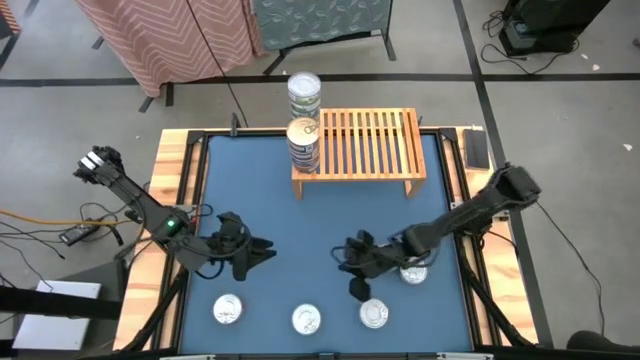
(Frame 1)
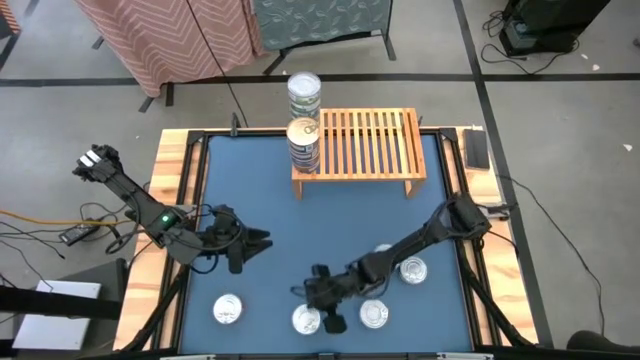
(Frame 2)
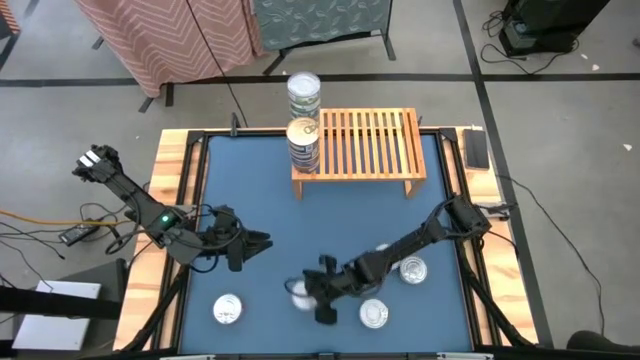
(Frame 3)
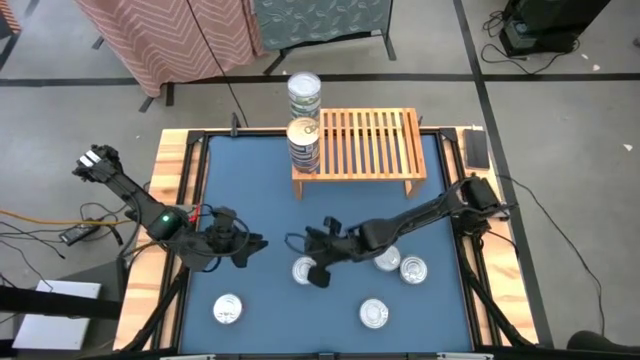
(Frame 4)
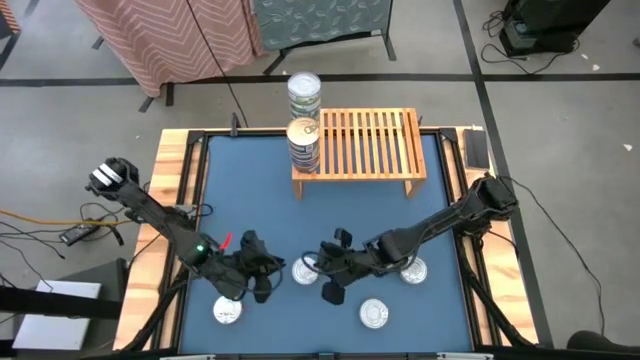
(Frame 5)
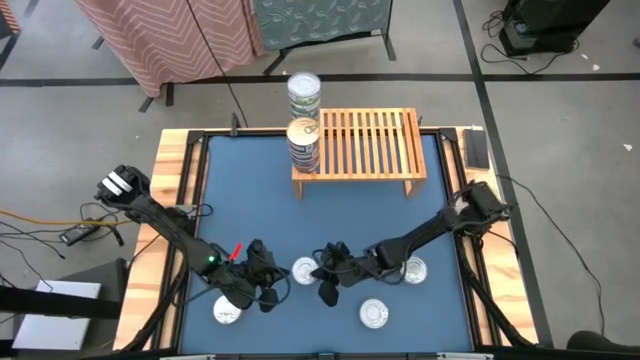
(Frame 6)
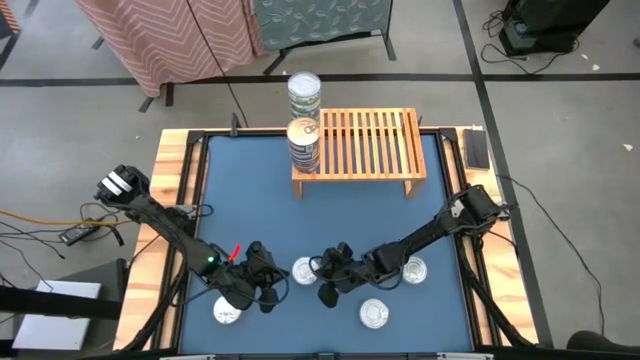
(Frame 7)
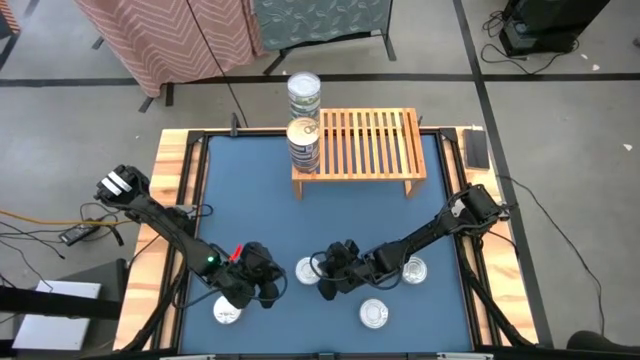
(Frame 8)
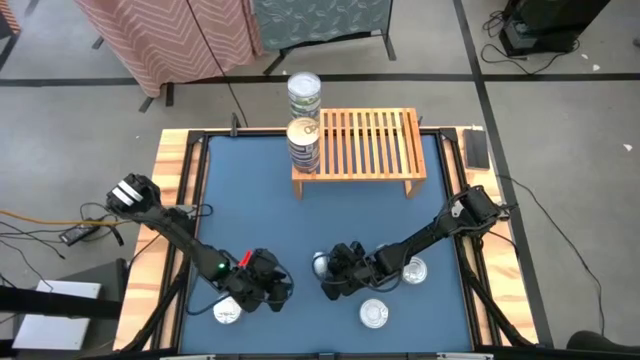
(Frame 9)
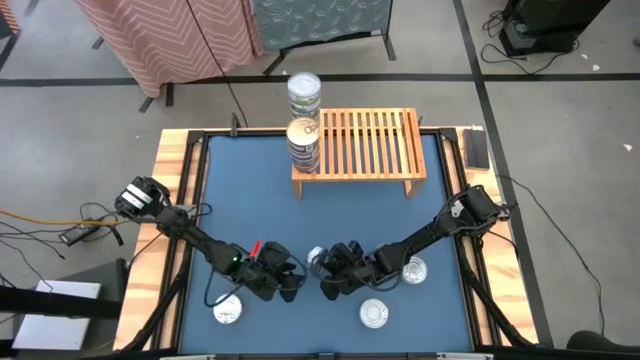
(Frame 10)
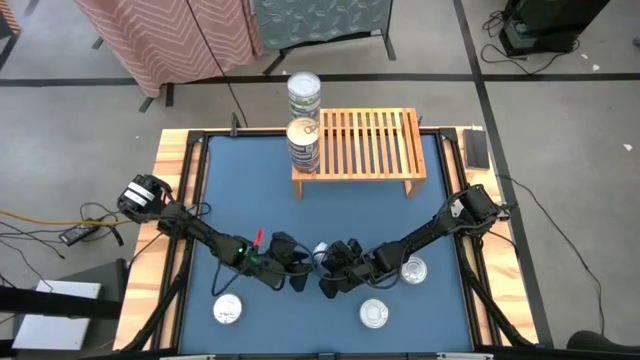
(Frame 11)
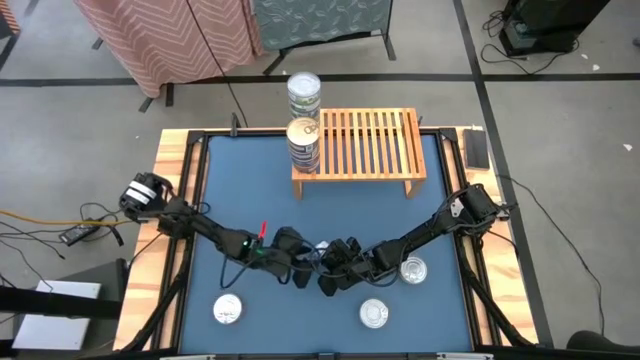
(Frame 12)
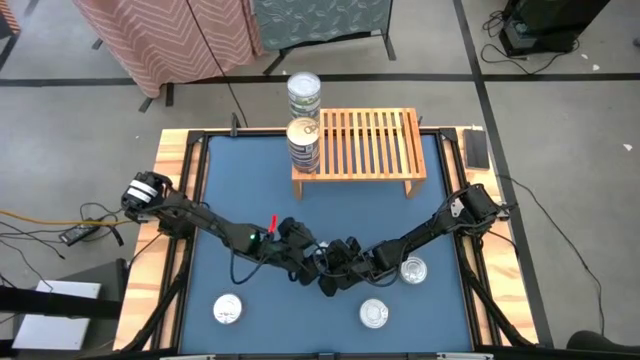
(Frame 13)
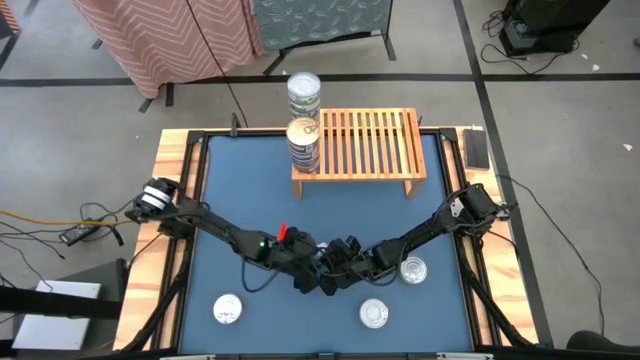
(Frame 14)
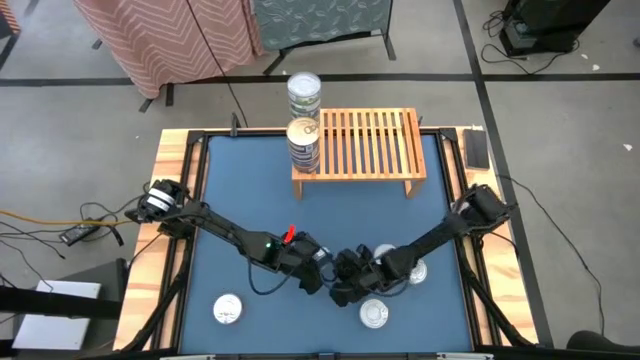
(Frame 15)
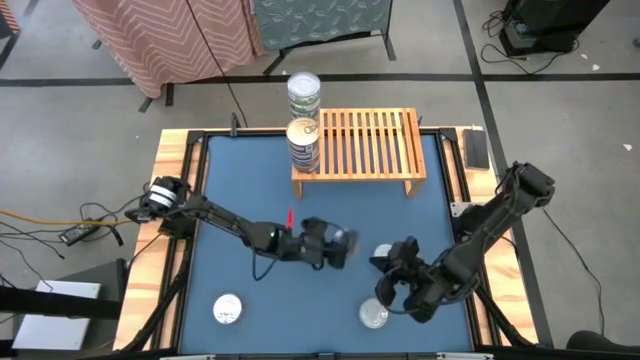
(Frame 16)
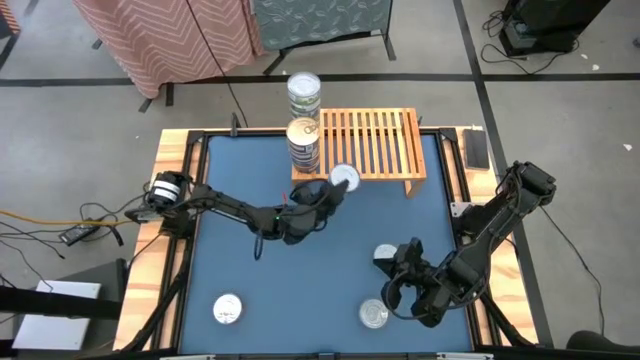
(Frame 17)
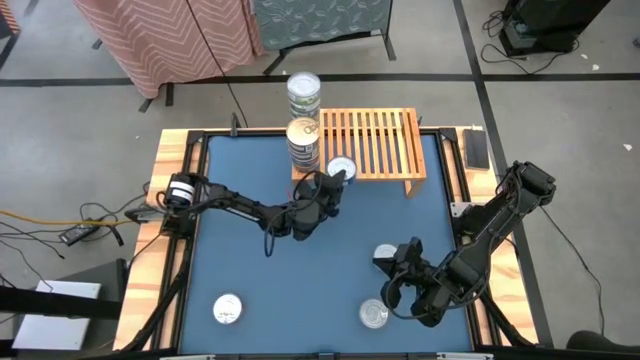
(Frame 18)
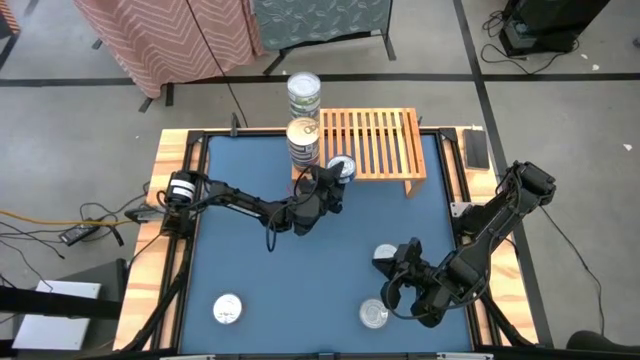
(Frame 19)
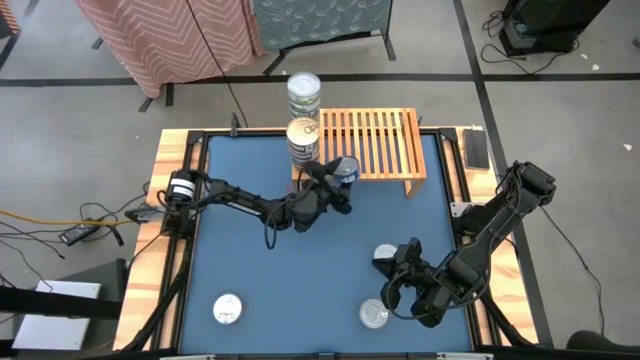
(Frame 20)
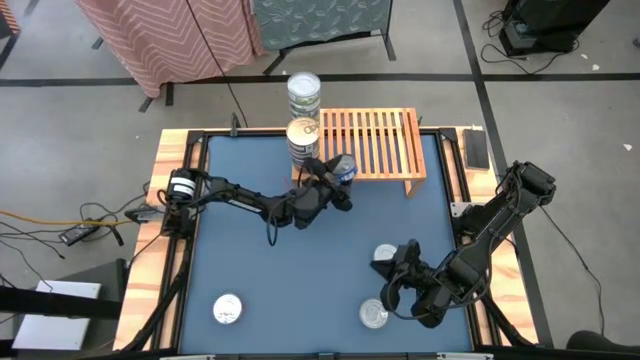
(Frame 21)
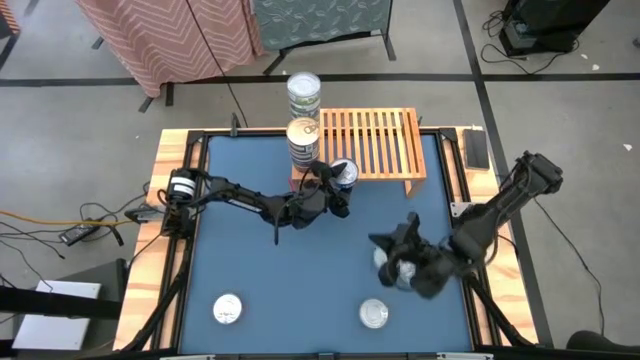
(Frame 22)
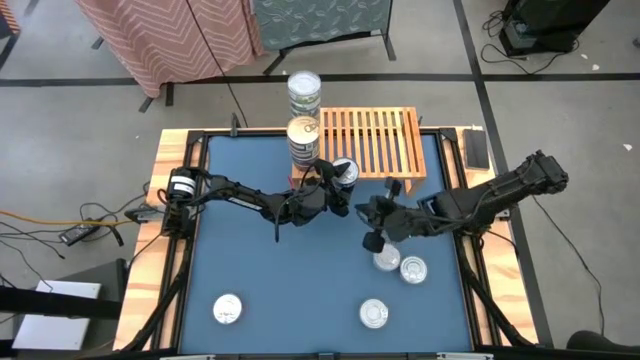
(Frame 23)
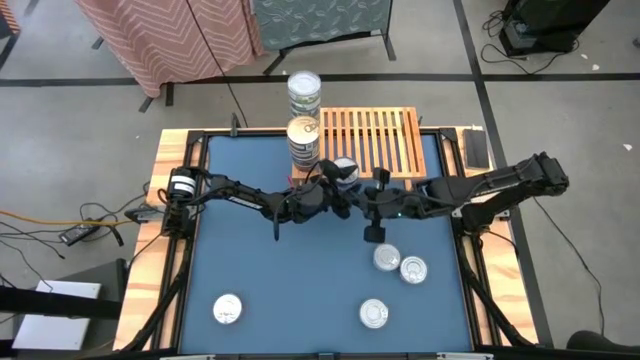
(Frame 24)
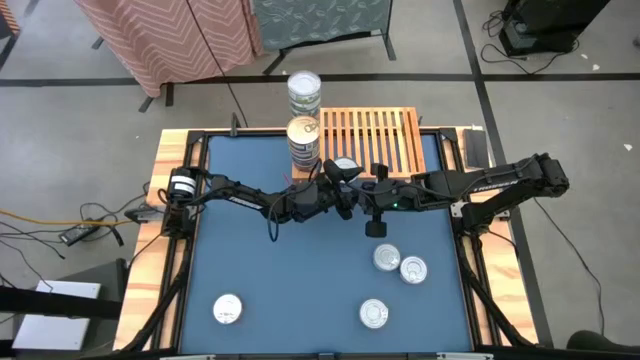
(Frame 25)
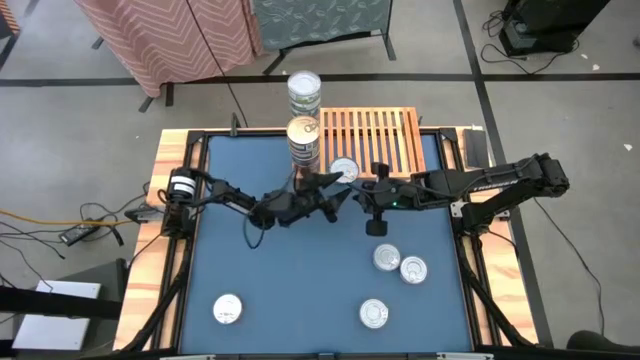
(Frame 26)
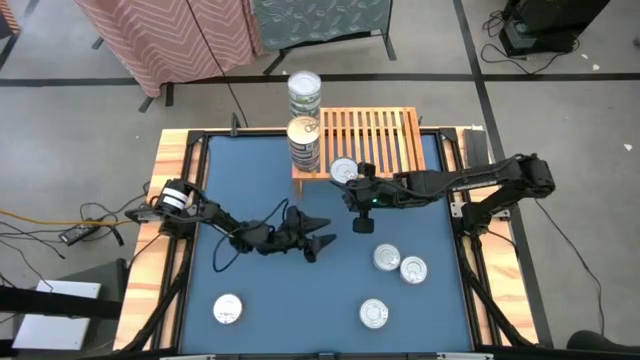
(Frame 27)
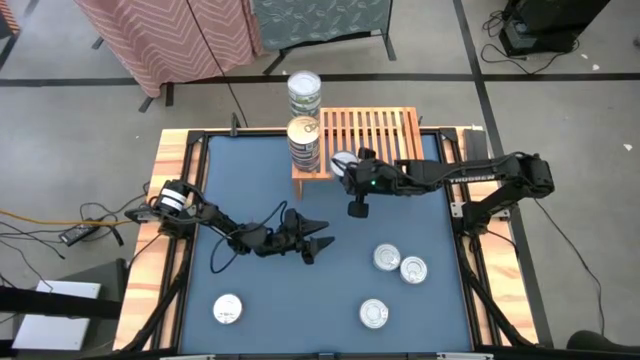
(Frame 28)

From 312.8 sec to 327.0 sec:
Task: Stack canned seafood by type on shelf
Put the dark blue tuna can on the shelf

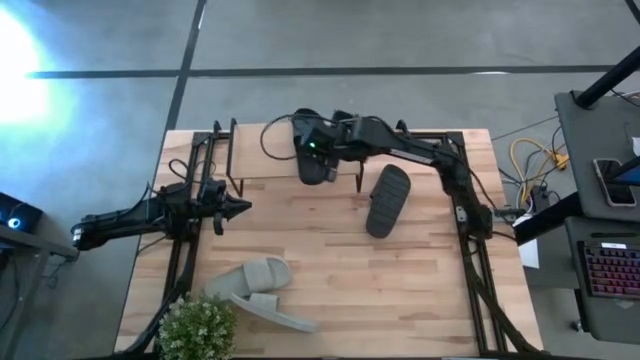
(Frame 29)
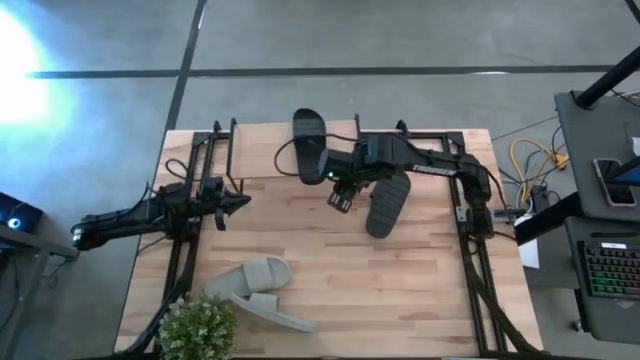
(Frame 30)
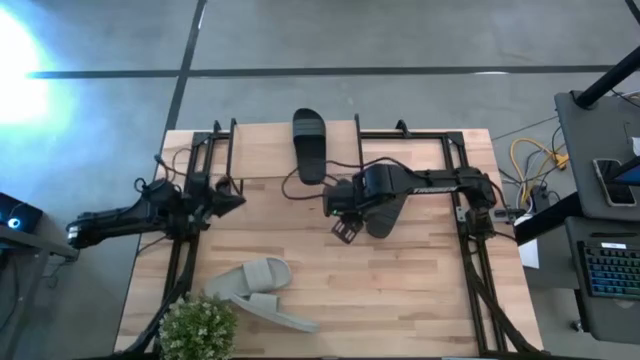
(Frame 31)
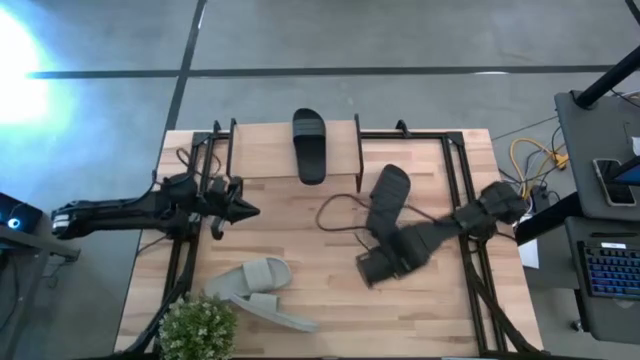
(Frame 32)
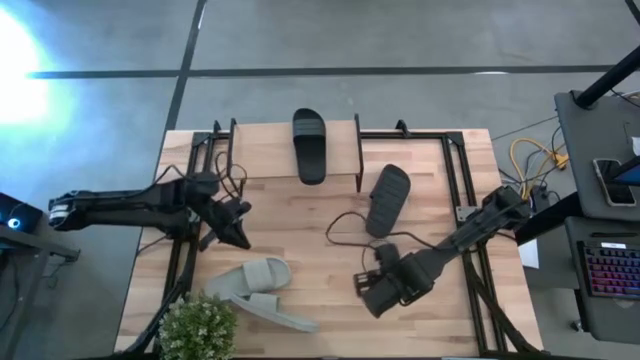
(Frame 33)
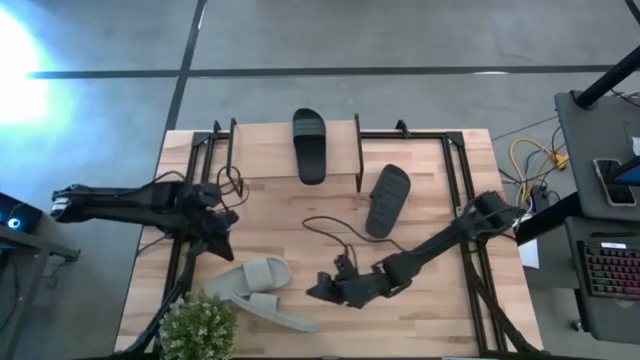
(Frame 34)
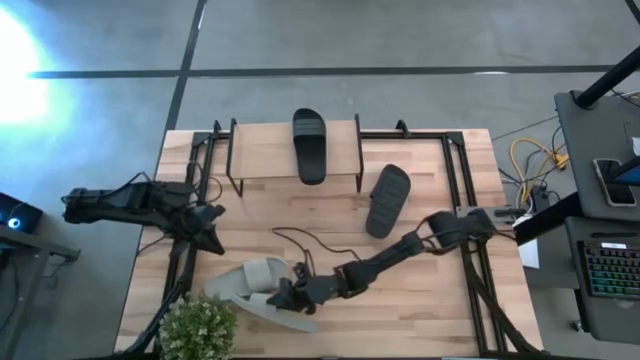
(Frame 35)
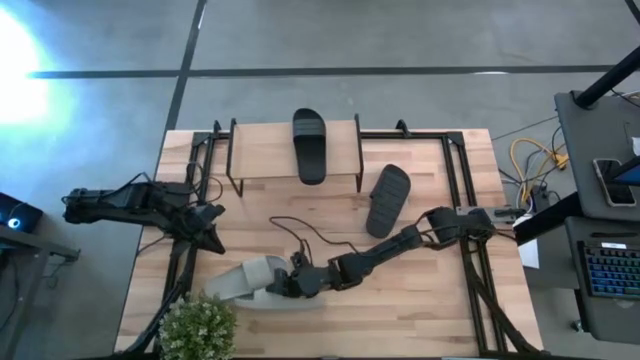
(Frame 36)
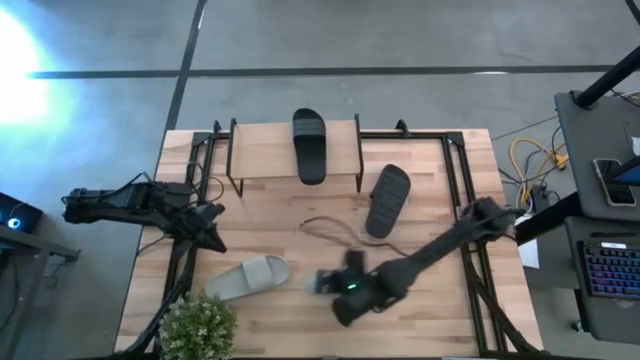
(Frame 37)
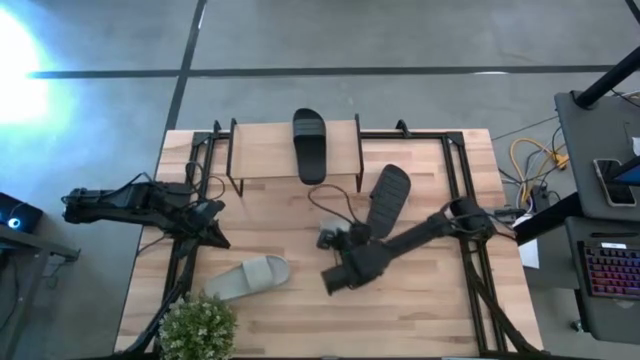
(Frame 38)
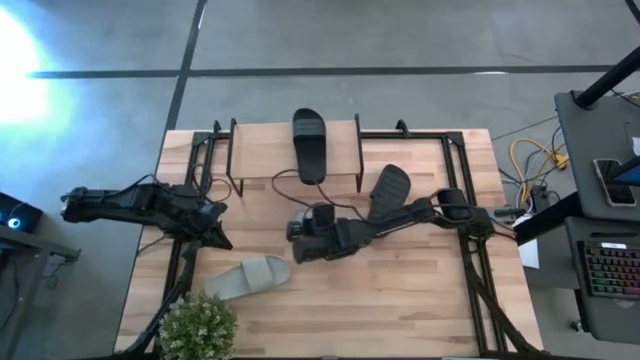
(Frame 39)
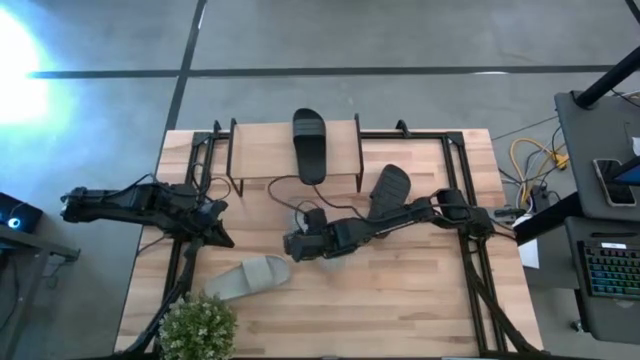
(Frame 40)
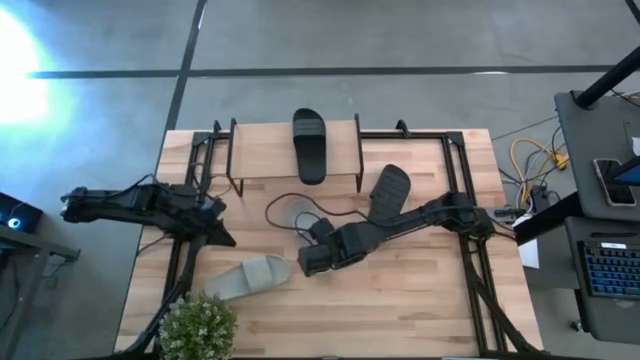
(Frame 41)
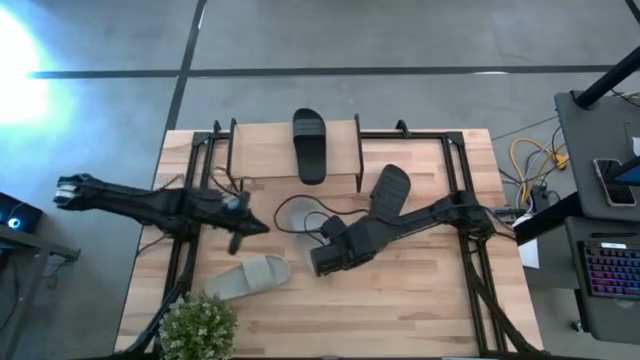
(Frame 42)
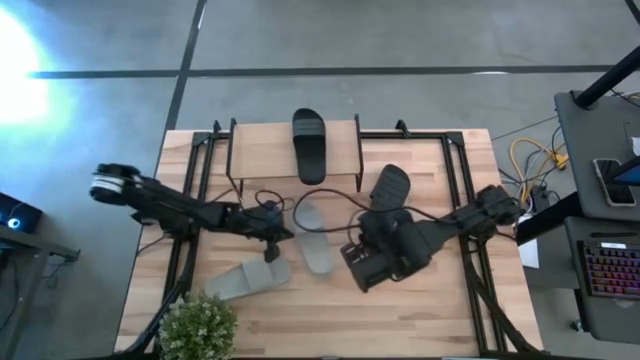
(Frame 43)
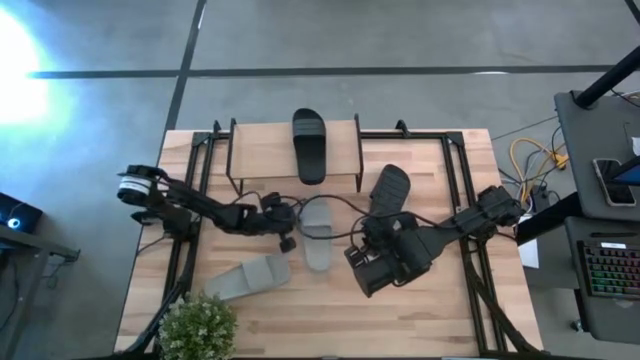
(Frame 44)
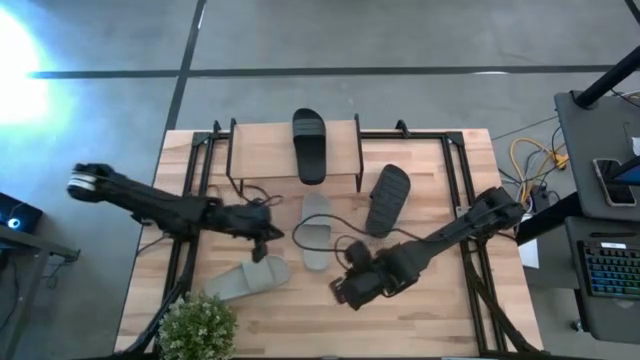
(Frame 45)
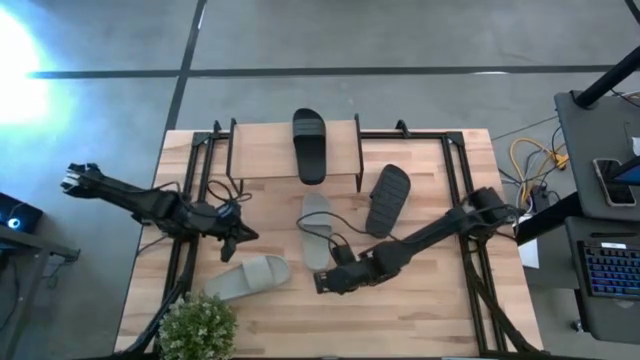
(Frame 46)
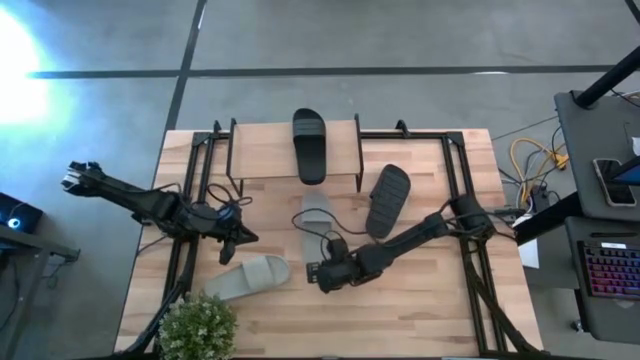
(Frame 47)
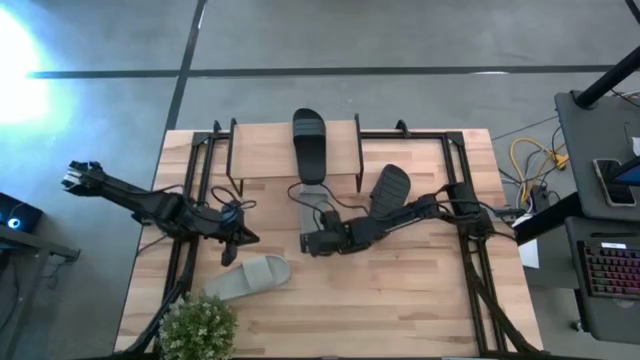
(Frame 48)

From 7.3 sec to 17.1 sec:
Task: Pick and place slides into the shelf
Put the bottom gray slide under the shelf
